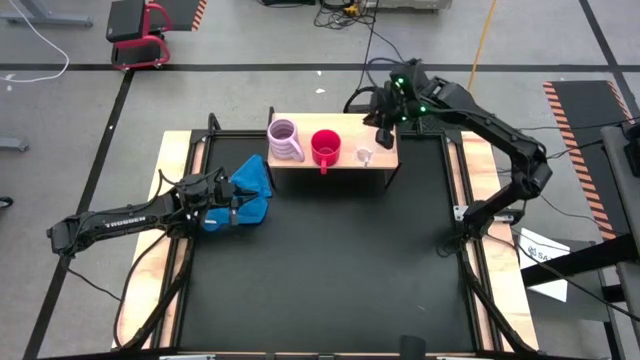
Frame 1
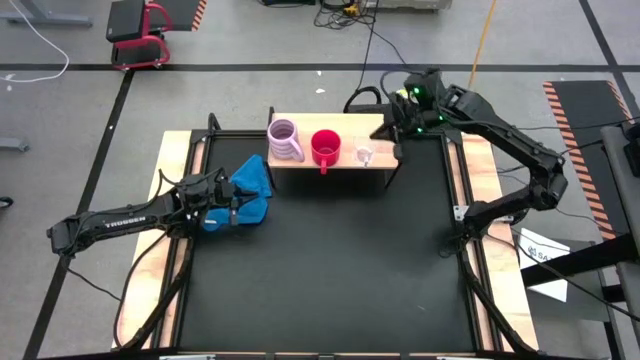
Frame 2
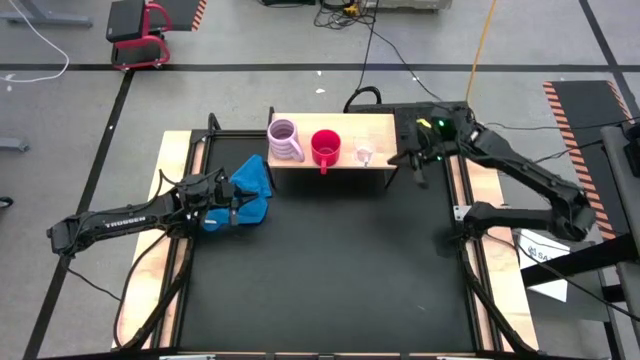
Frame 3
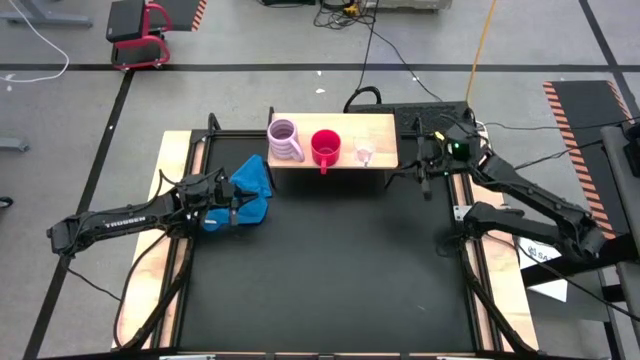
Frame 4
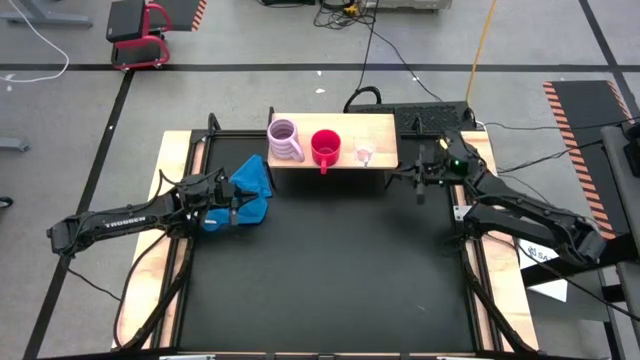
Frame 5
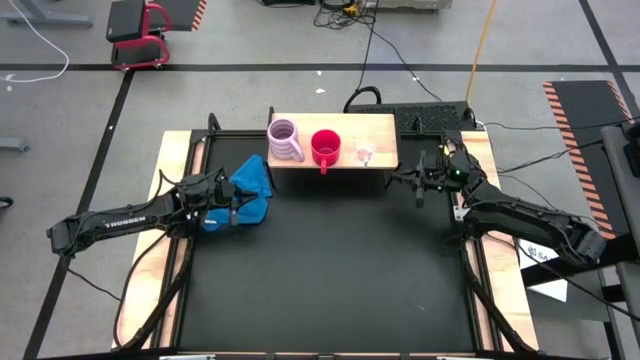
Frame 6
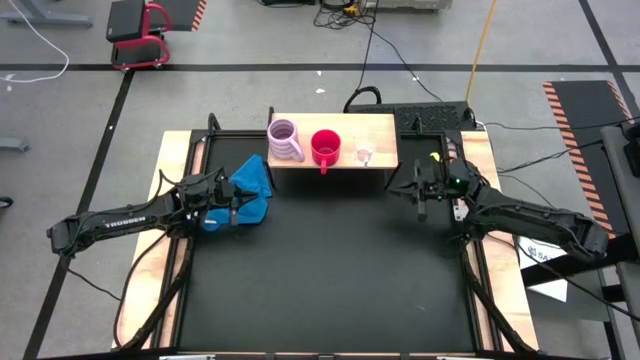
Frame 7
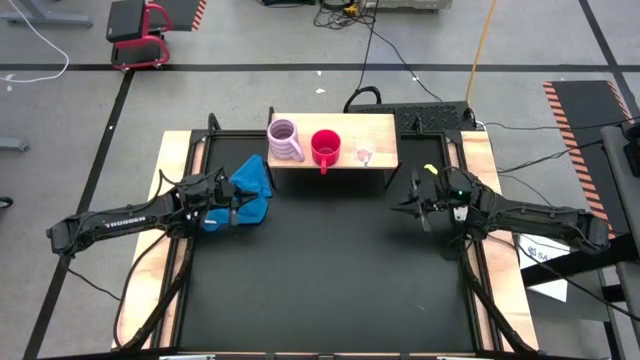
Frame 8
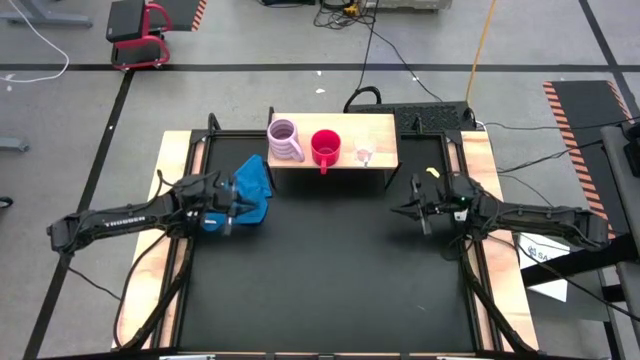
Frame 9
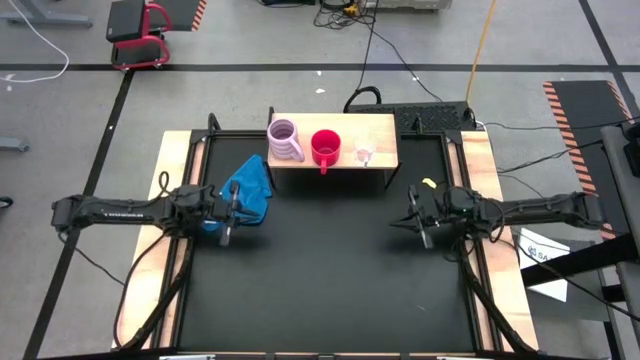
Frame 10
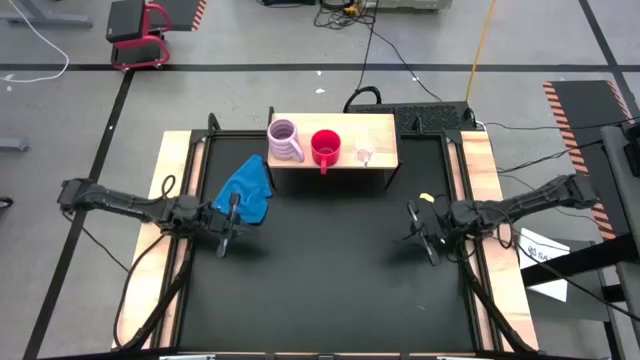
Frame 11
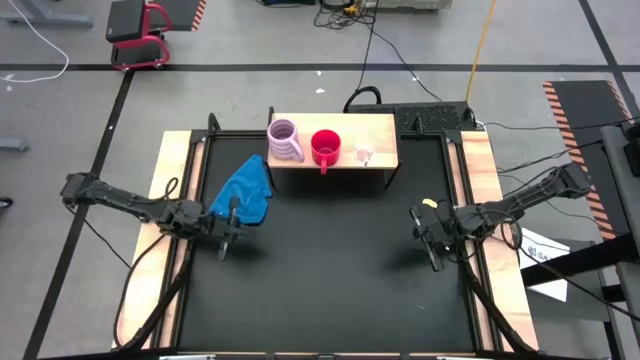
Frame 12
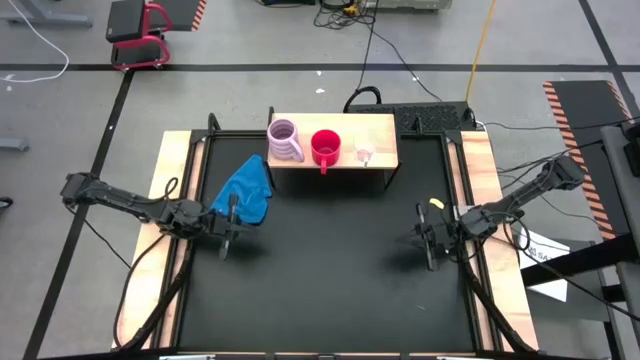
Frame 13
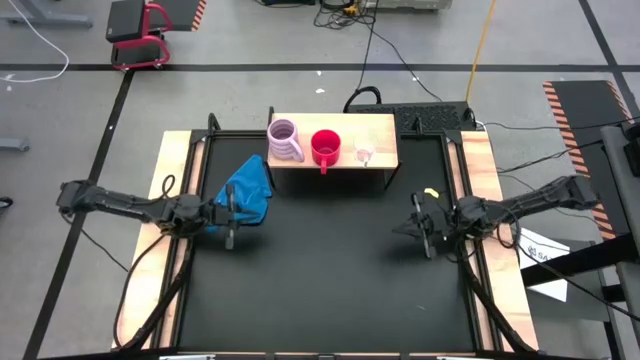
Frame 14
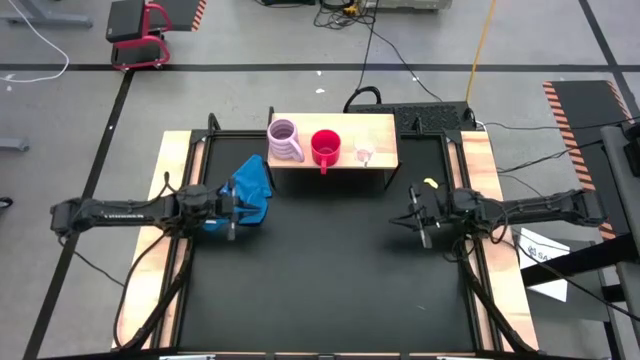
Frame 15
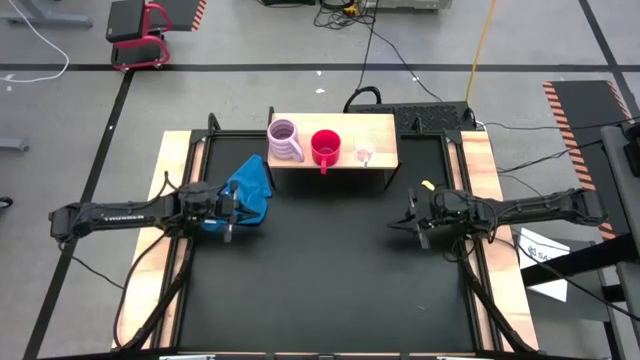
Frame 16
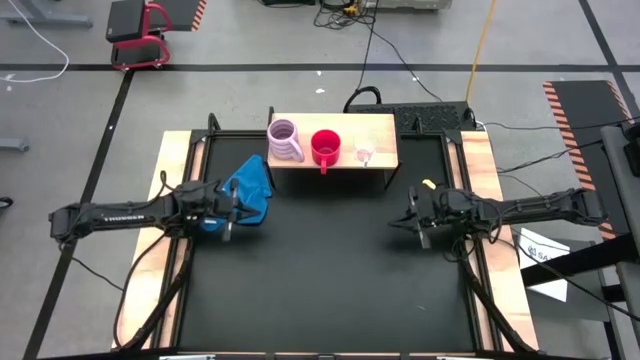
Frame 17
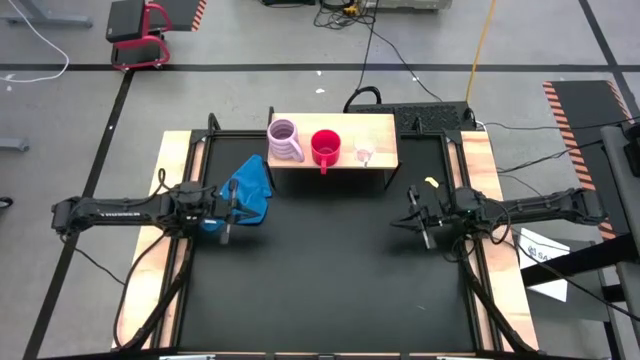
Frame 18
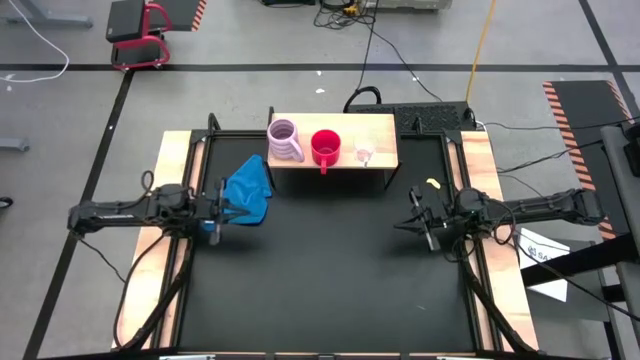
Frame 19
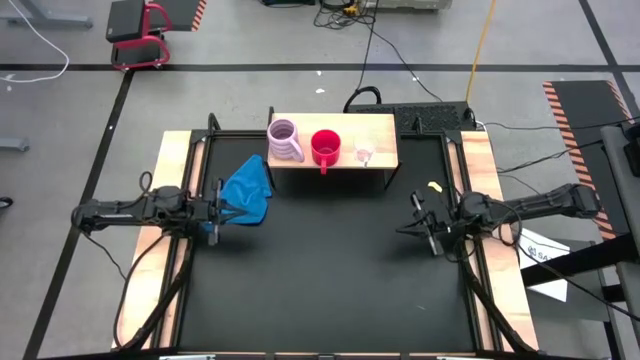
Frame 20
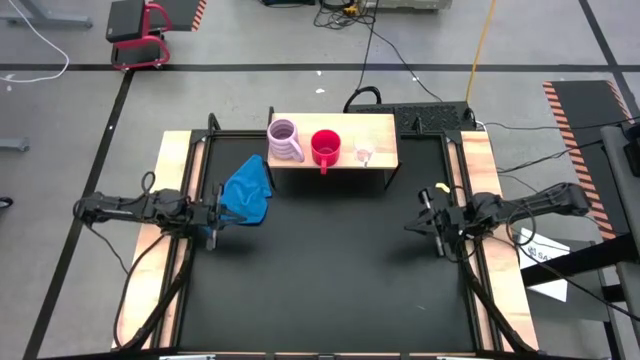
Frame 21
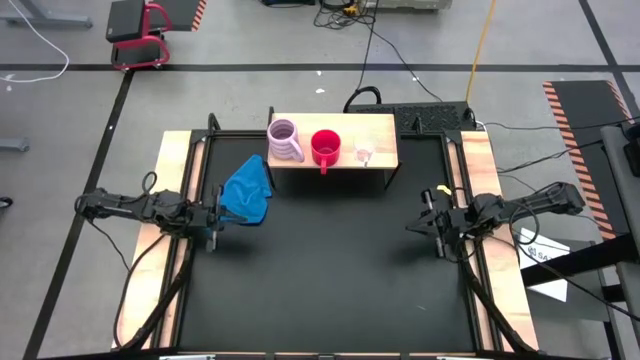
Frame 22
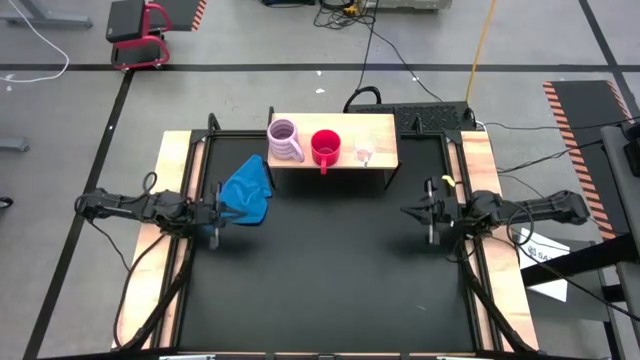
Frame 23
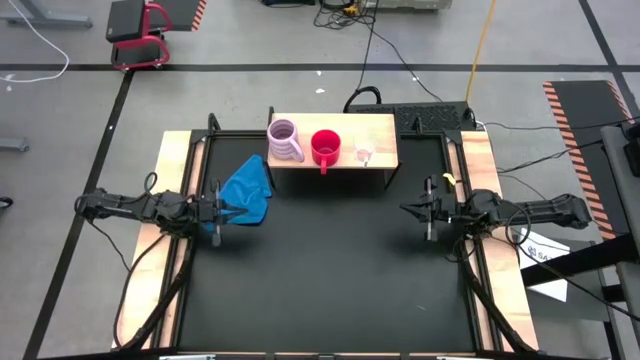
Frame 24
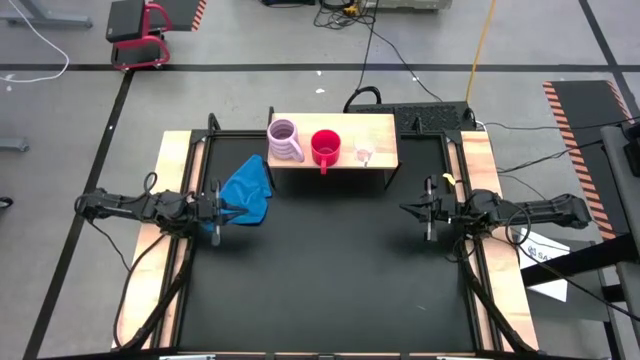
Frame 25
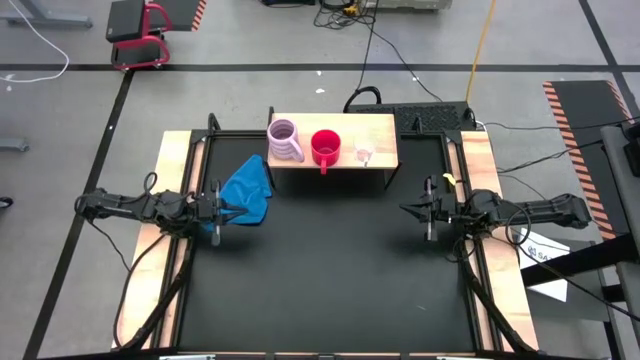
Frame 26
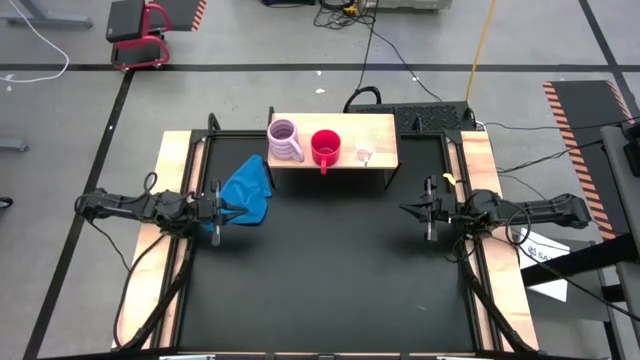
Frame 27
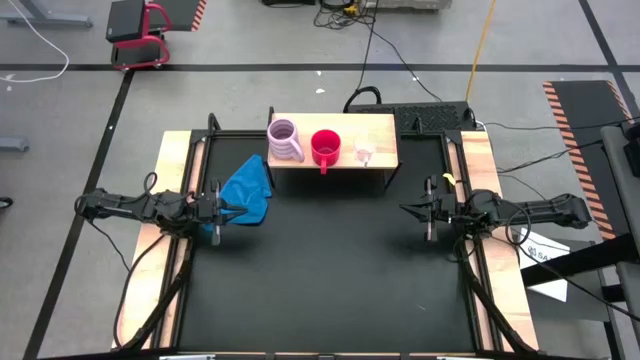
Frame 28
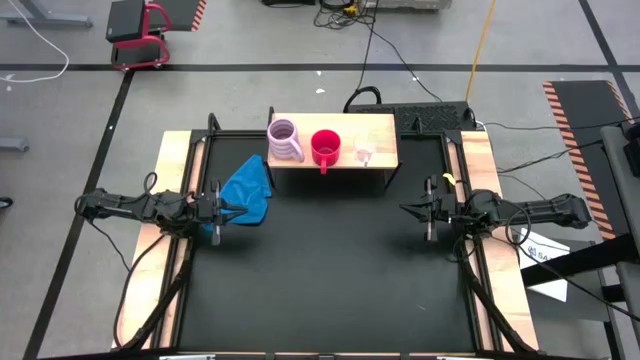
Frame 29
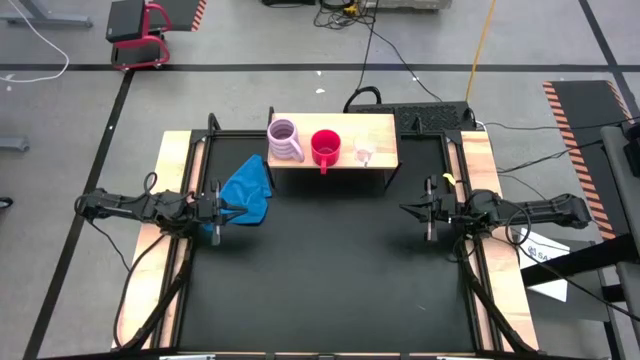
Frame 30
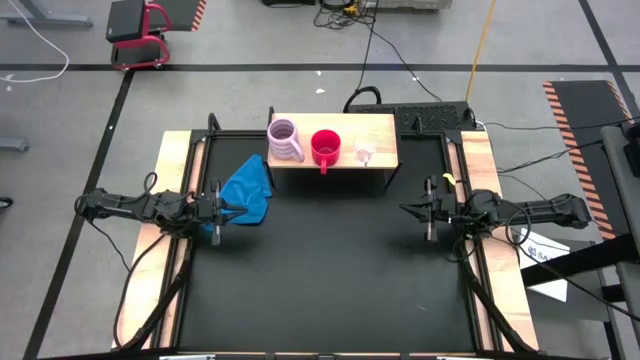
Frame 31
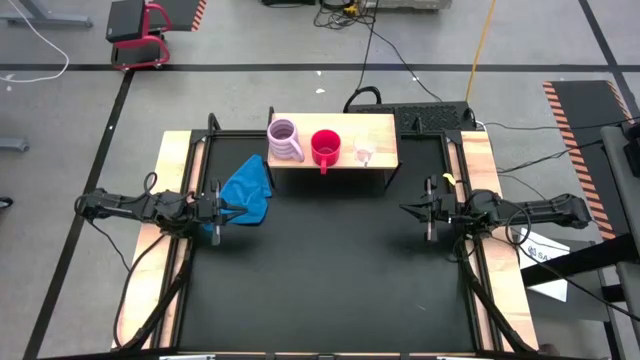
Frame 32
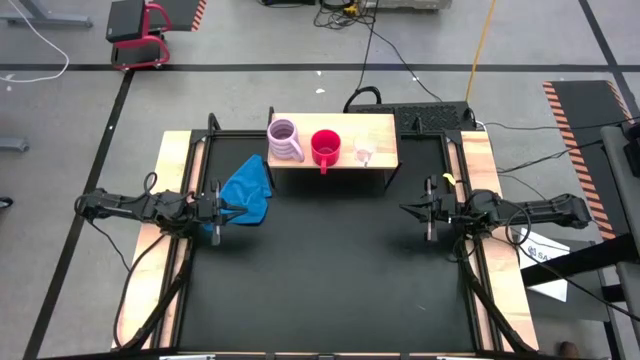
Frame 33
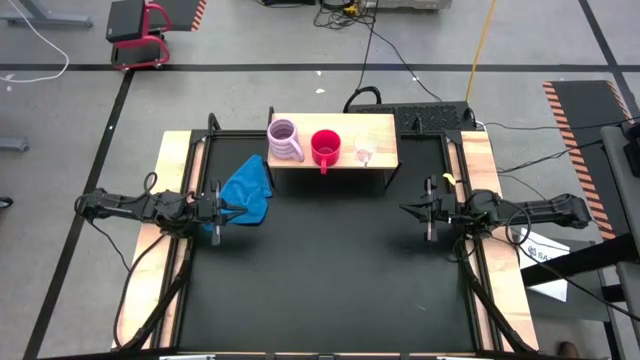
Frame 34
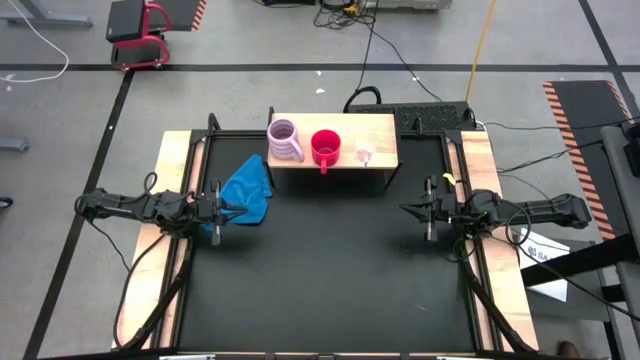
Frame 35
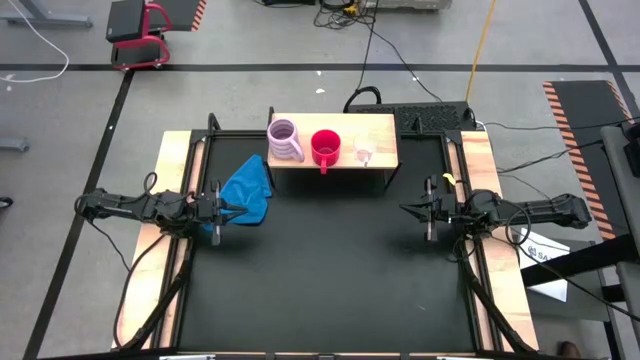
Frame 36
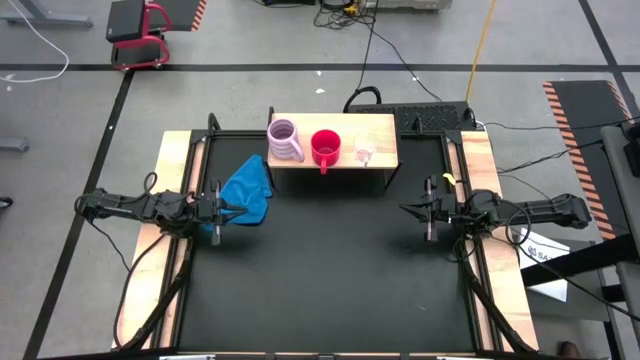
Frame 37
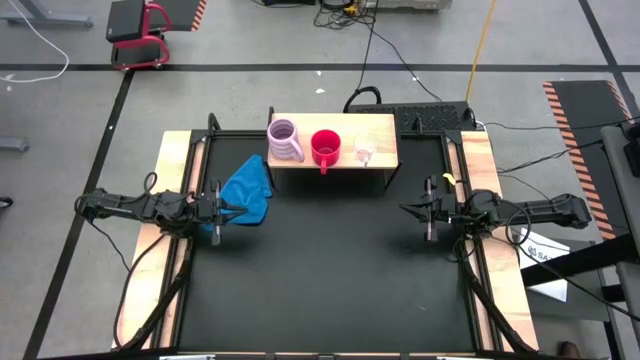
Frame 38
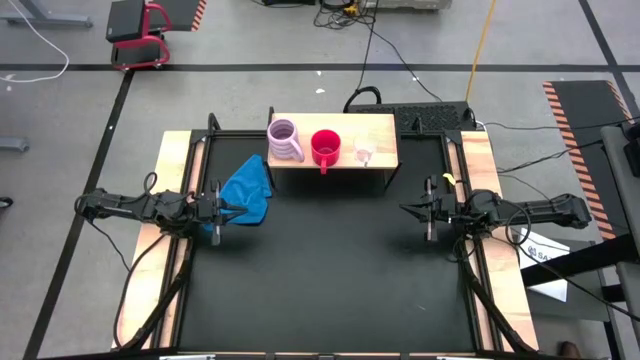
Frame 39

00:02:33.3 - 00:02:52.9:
Task: Stack small to large cups/mugs on shelf
Return to Home Position

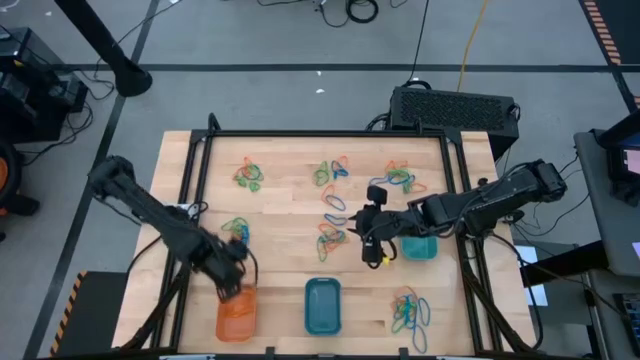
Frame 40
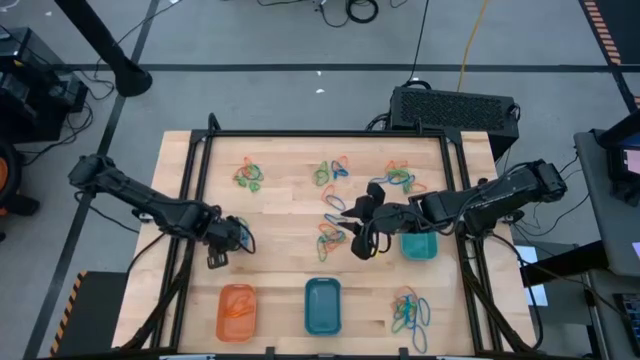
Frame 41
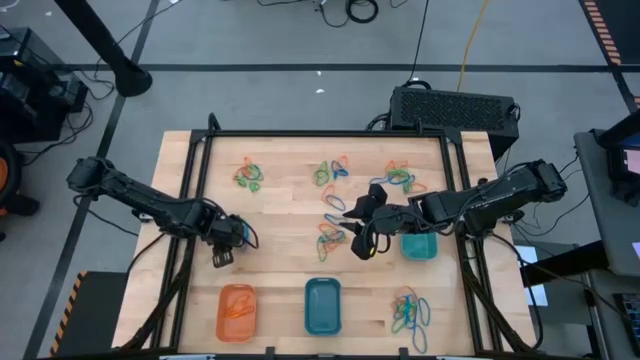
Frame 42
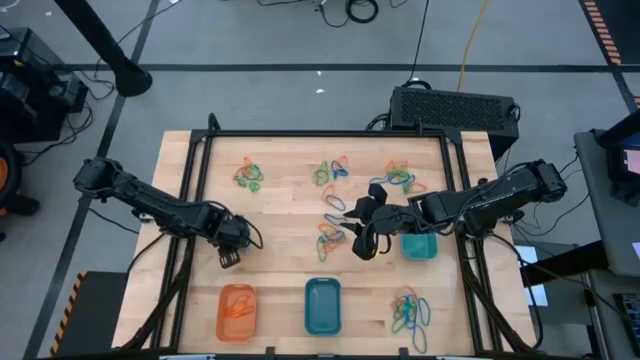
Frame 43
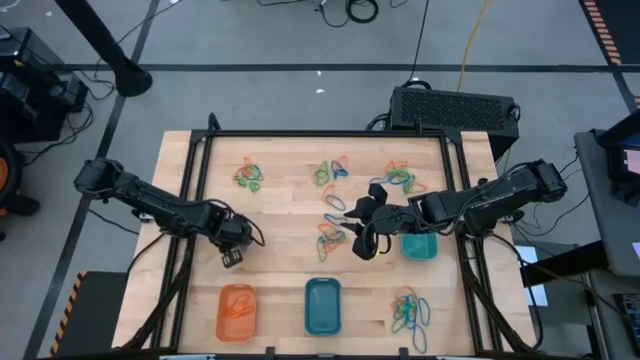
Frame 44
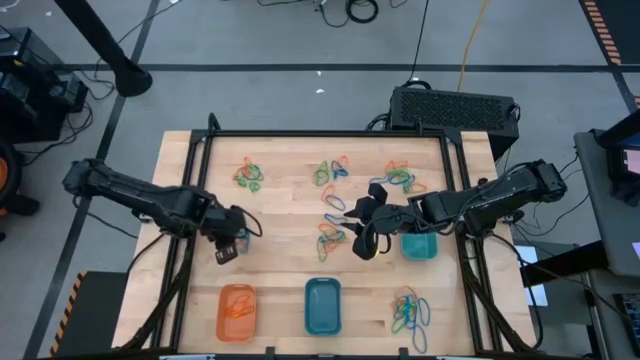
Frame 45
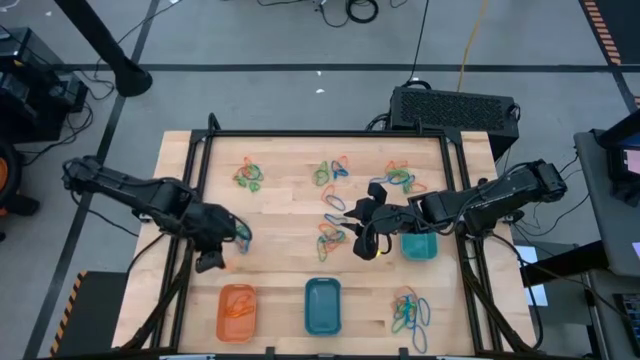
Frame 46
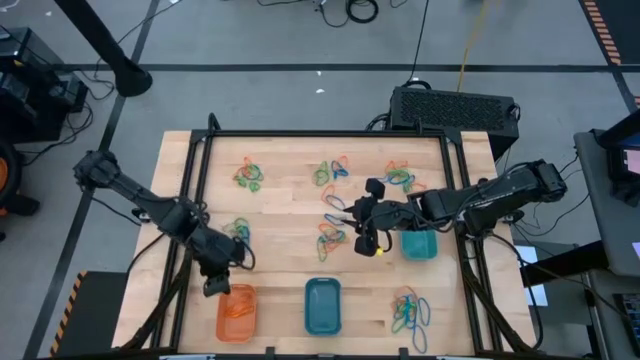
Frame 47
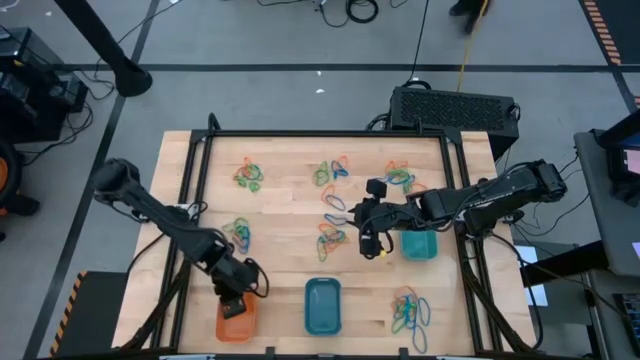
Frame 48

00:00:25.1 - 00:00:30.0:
Task: Sort rubber bands into baskets
Put the orange rubber band into the orange bin
